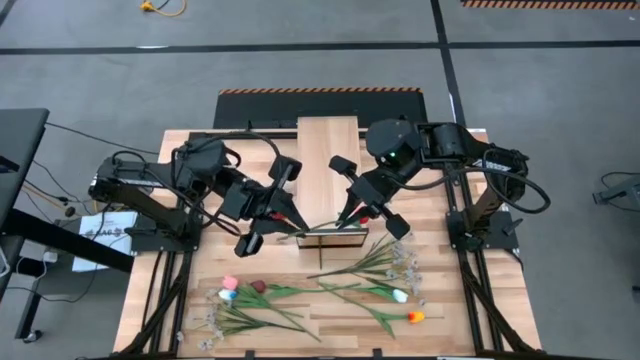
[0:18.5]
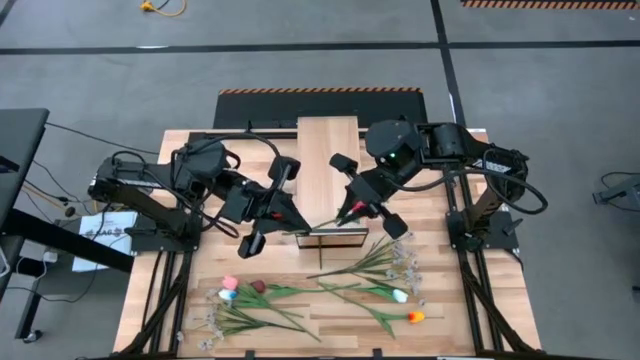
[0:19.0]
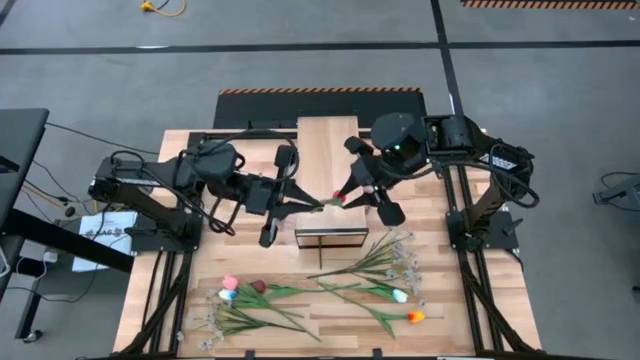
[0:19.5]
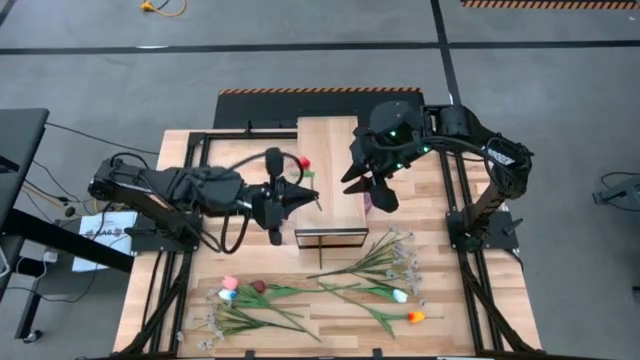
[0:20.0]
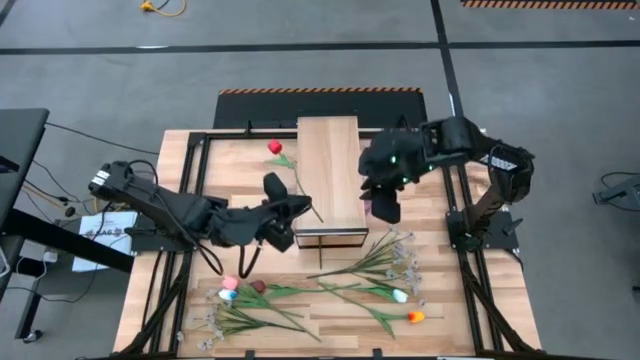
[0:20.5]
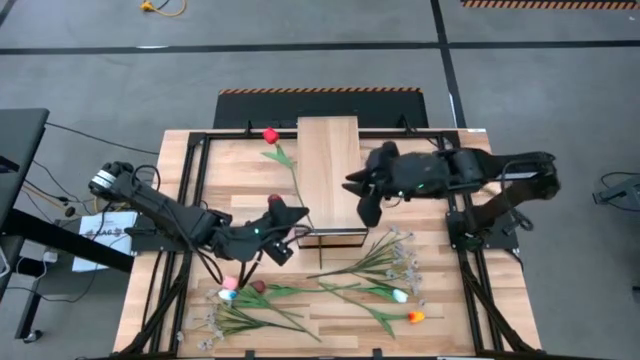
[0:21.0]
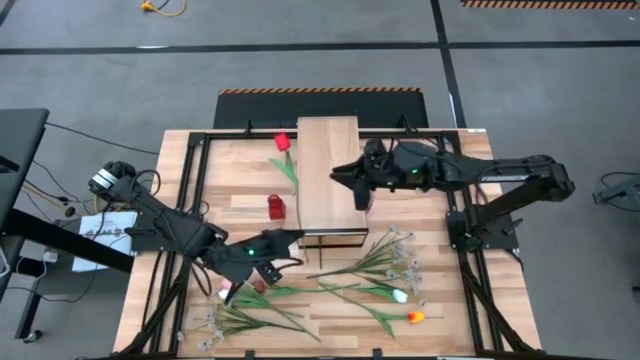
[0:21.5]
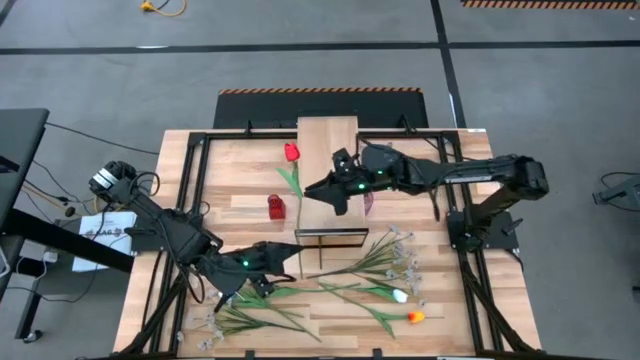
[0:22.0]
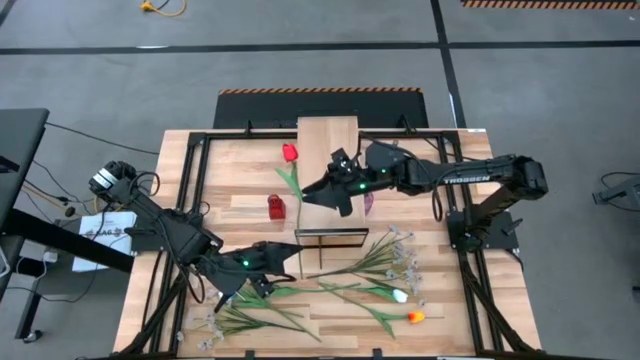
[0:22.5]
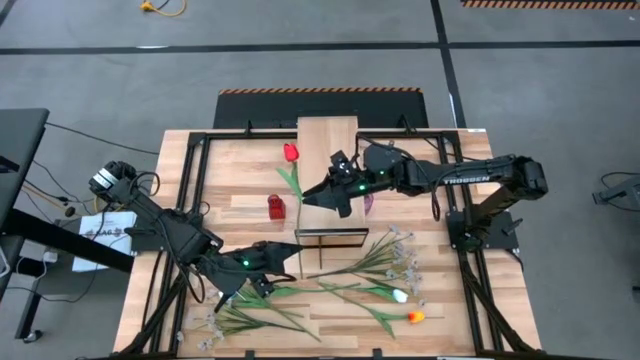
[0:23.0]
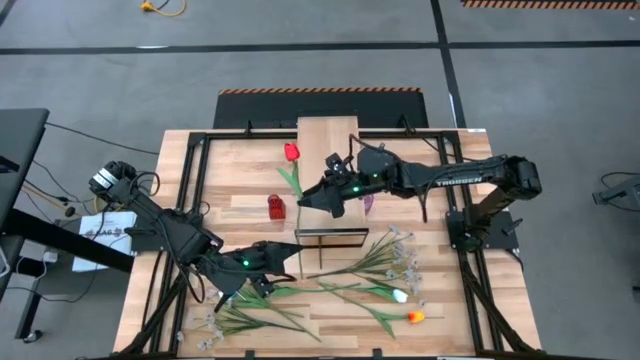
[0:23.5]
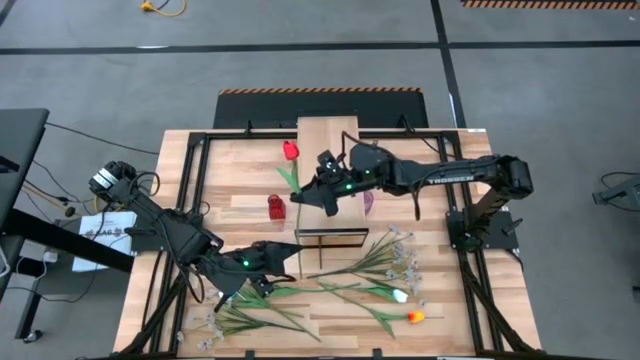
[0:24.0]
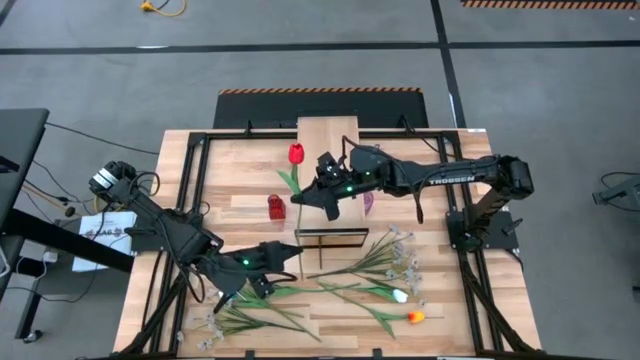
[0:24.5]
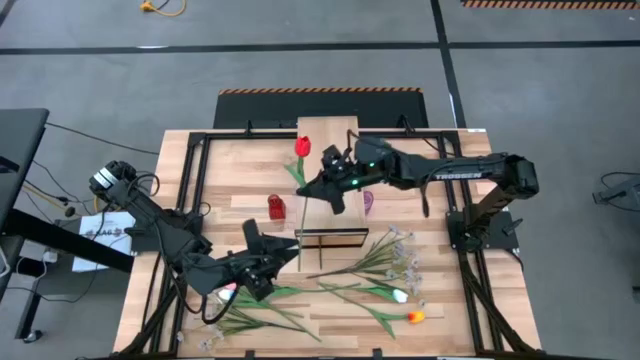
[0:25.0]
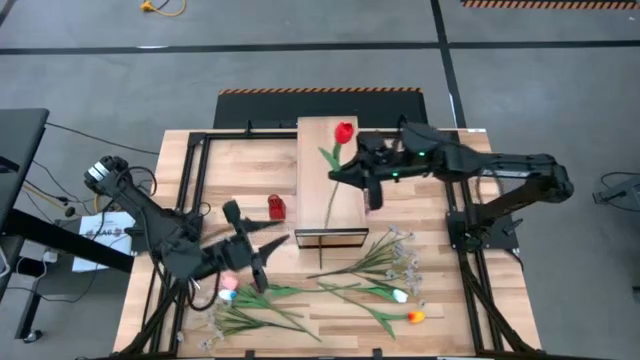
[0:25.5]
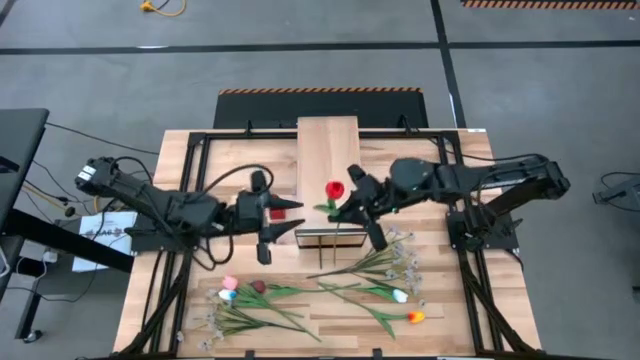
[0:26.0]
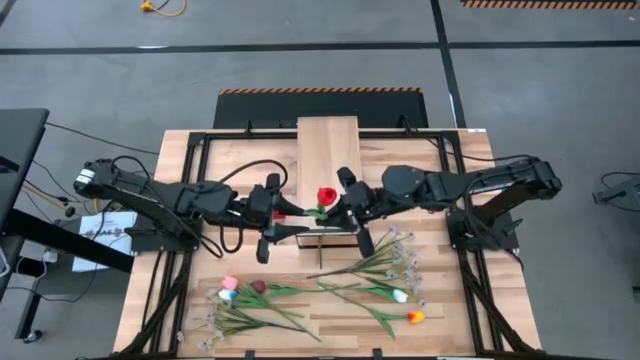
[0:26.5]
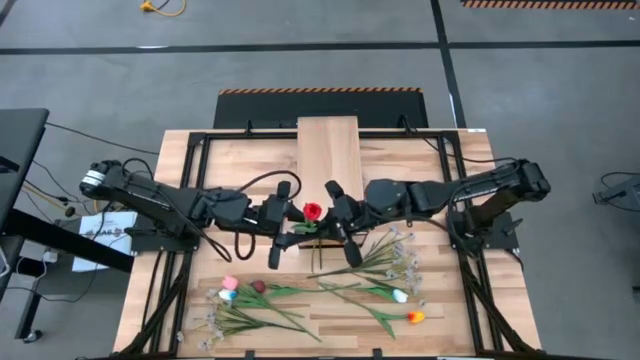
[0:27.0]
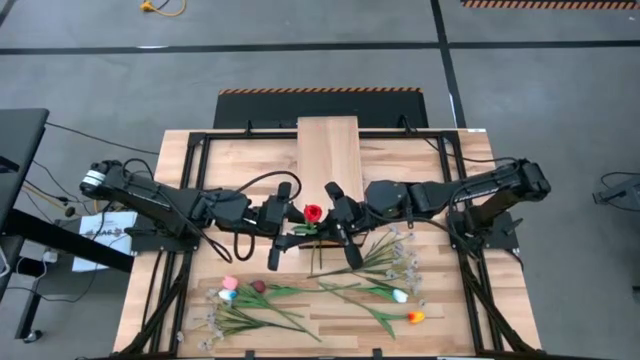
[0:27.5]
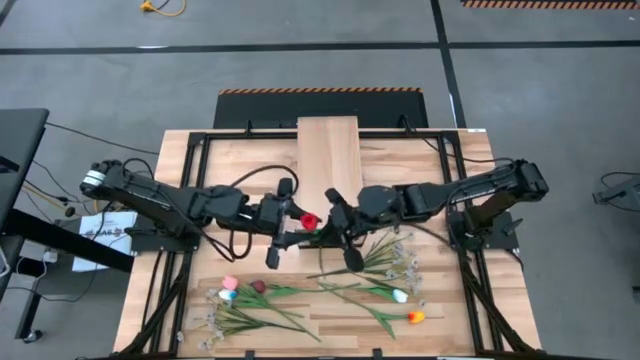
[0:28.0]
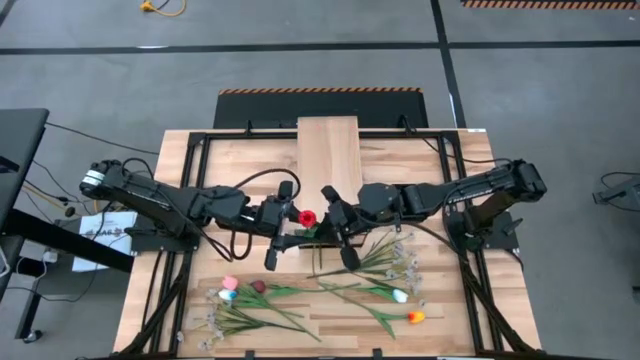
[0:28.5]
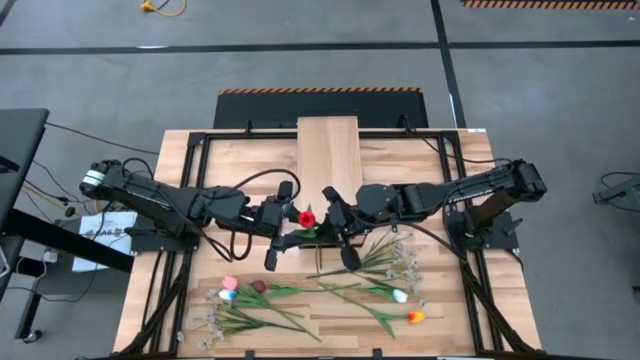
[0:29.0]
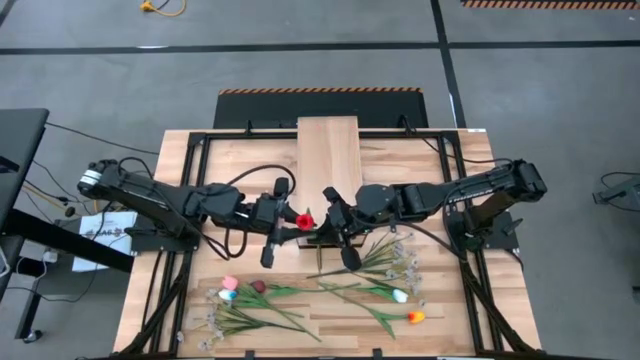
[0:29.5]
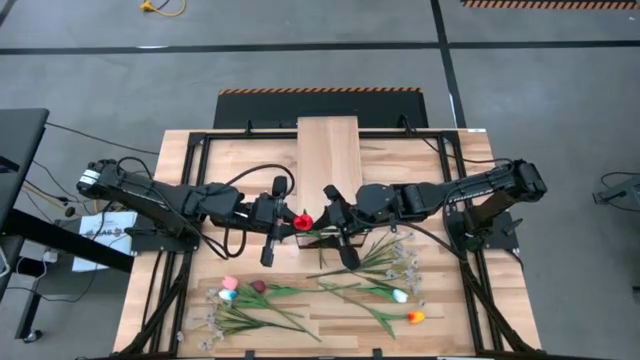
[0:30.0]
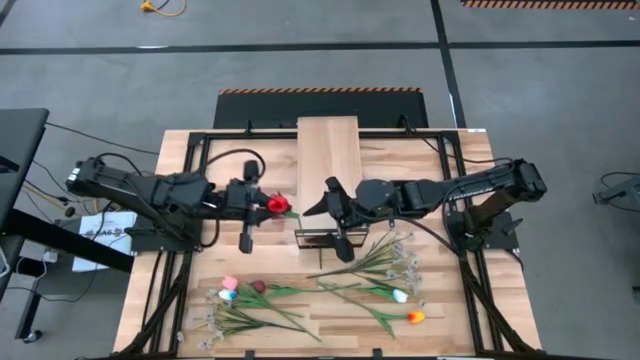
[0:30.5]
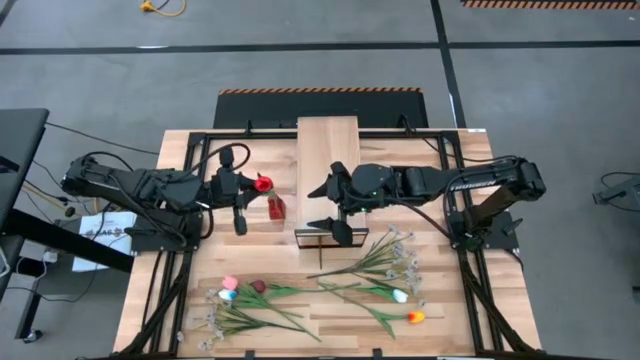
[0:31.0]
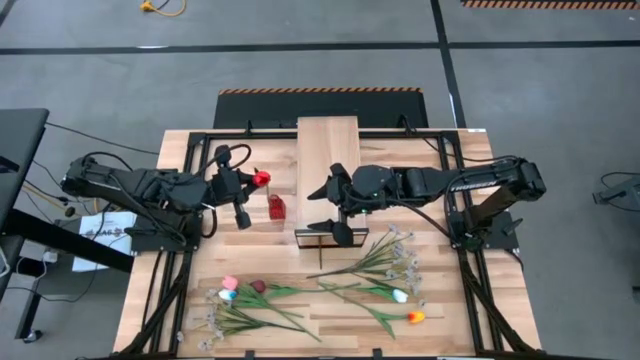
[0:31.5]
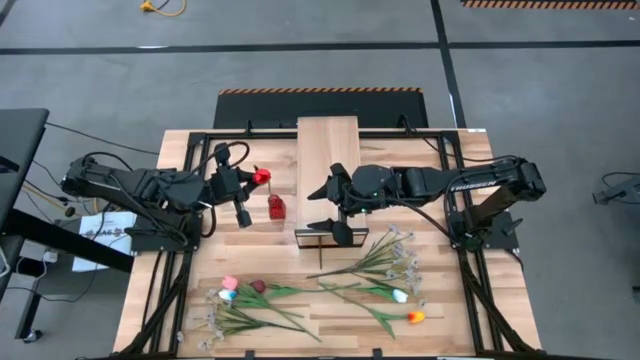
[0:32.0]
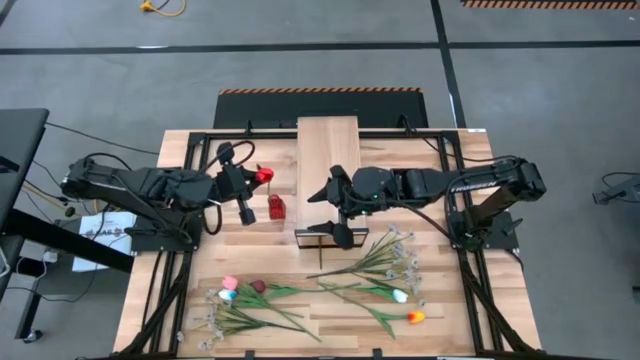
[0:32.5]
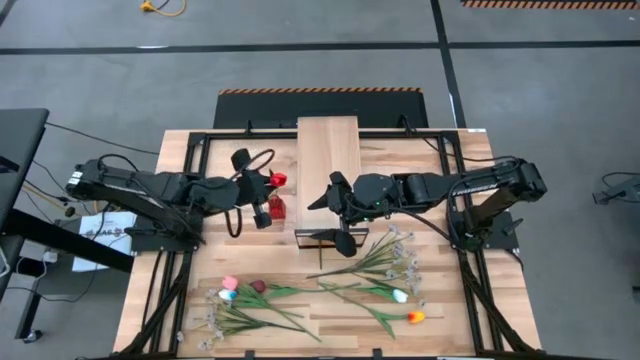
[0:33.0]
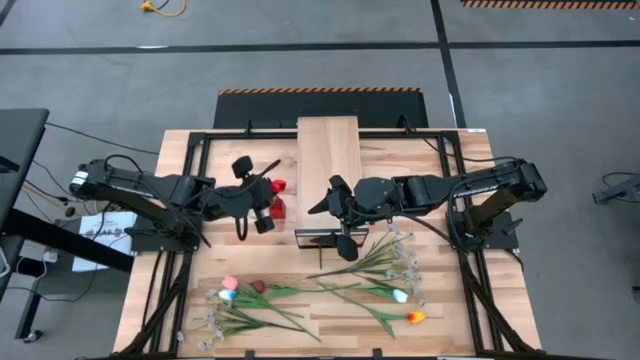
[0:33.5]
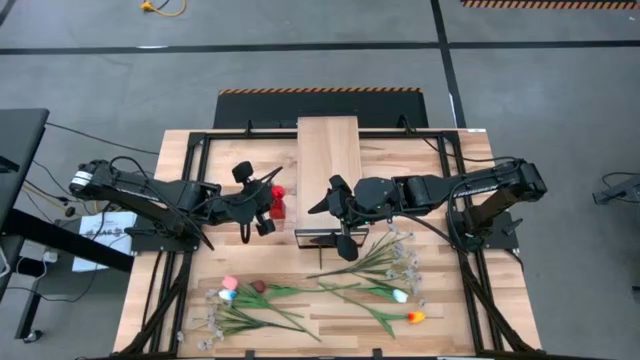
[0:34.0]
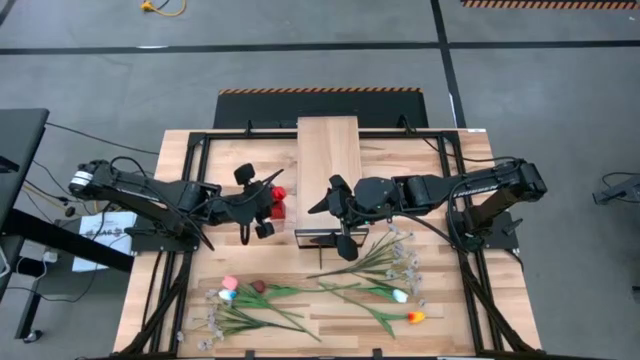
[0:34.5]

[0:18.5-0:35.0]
Task: Pick and place flowers into a vace then onto a shelf
Put the red tulip into the red flower vase

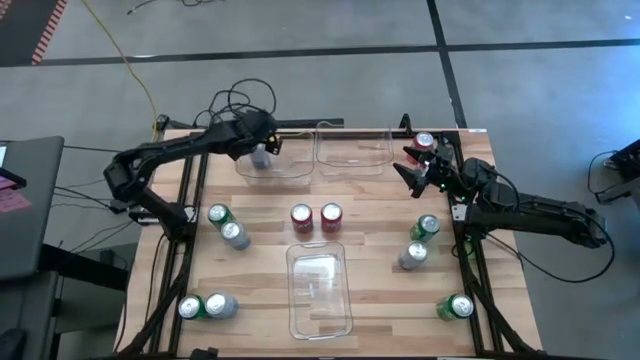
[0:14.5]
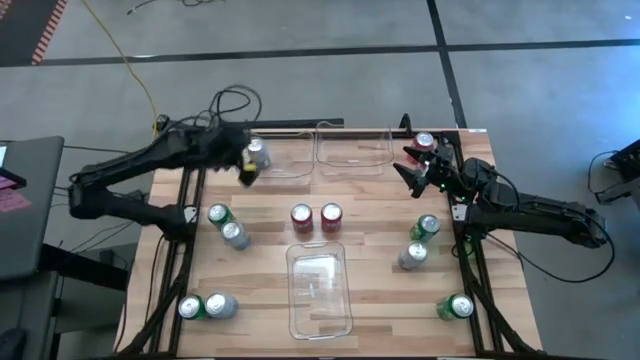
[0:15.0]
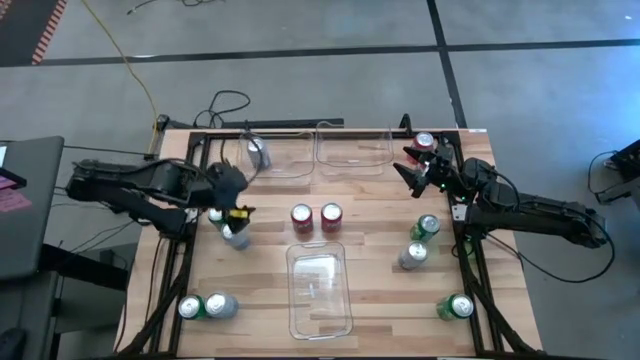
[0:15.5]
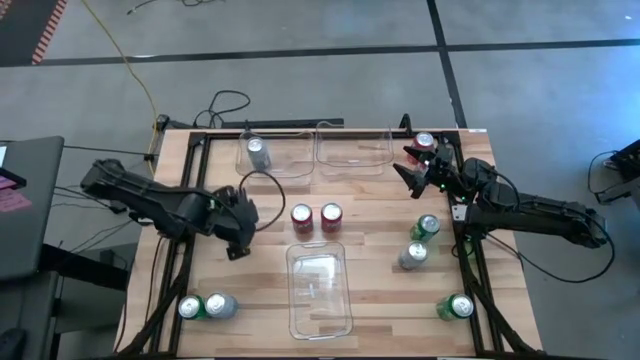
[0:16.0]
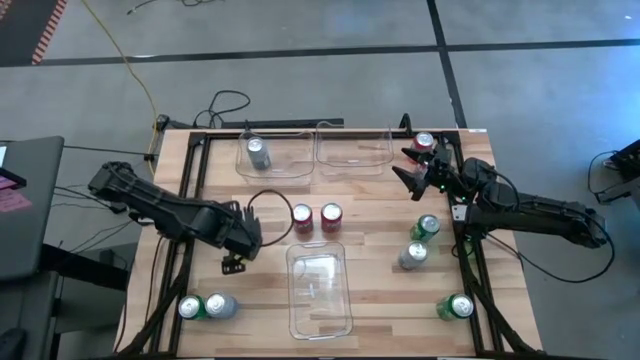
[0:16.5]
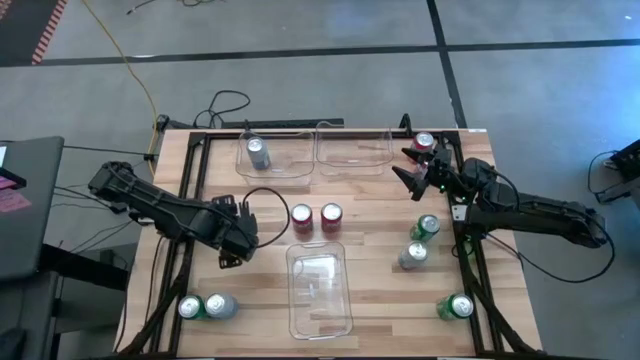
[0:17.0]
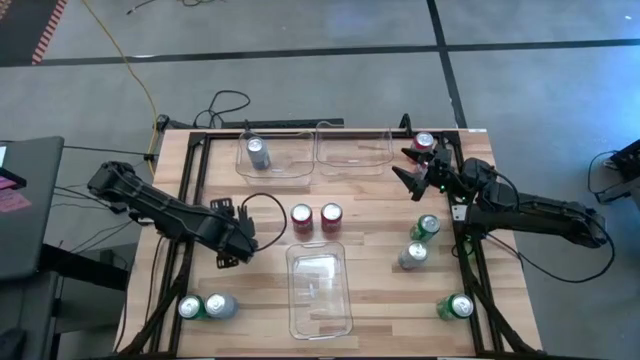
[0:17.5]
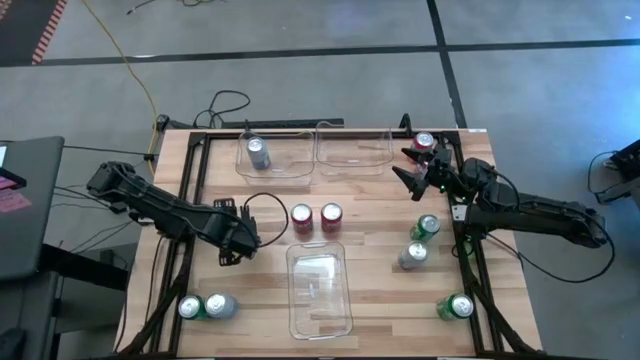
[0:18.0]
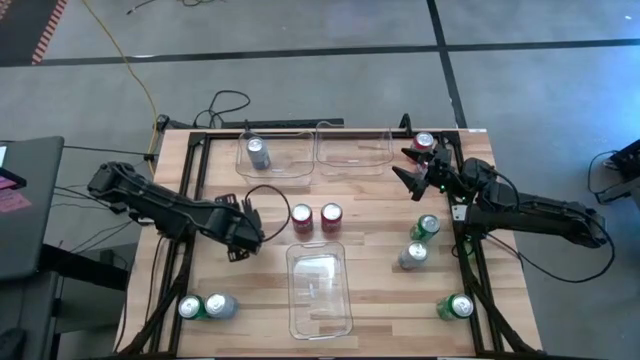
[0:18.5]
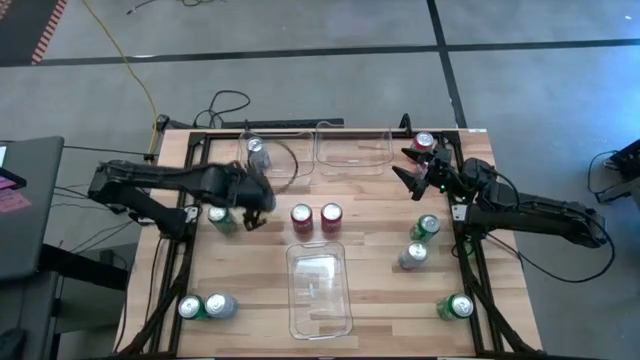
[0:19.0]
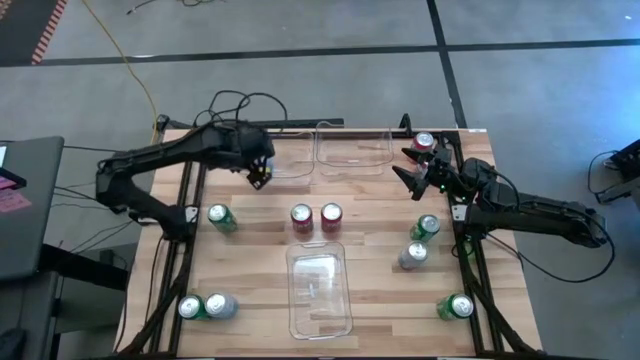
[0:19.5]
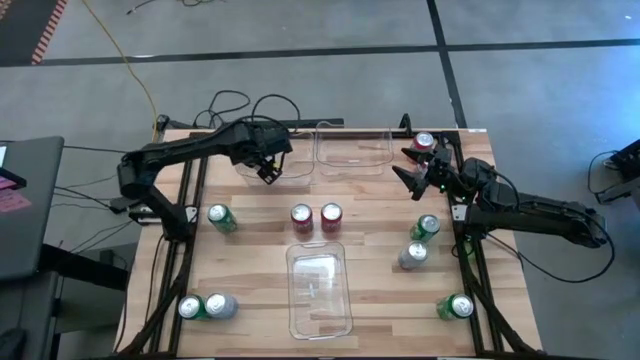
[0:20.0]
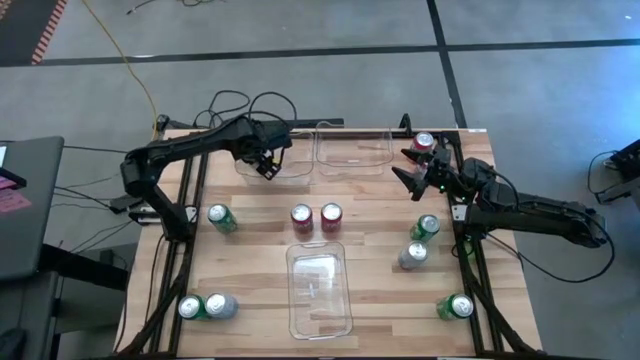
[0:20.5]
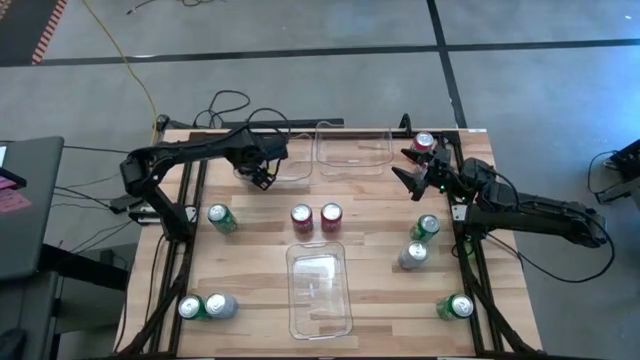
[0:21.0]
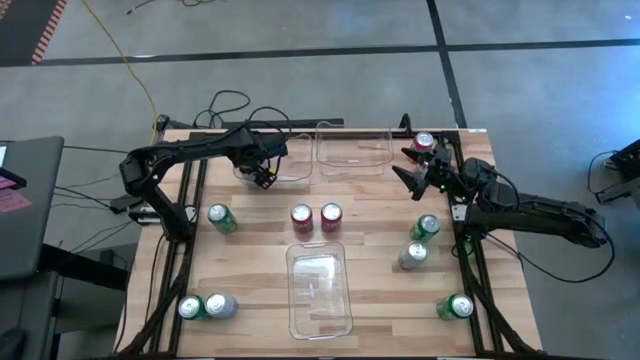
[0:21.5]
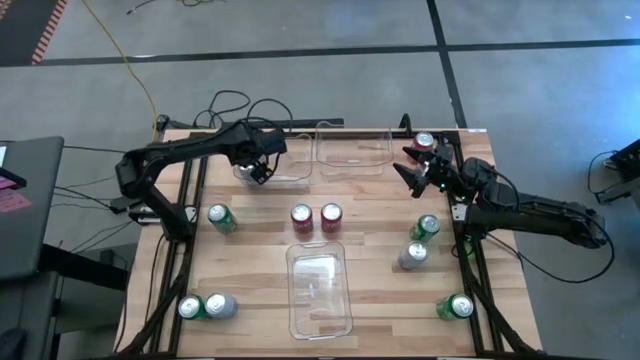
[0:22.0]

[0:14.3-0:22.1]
Task: Sort soda cans
Put the top left white and blue soda can into the top left transparent bin
